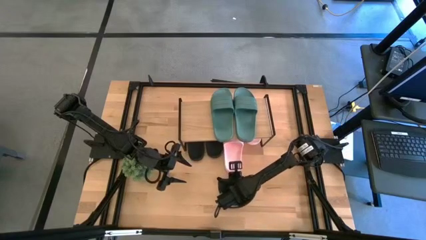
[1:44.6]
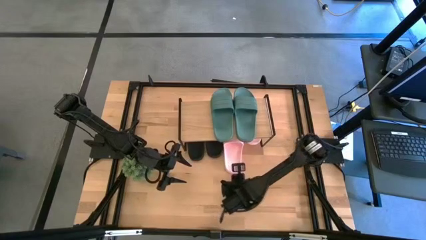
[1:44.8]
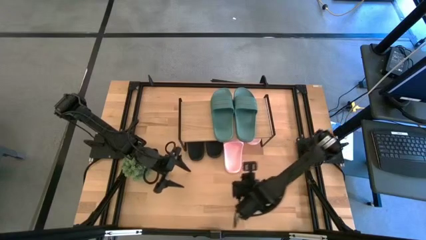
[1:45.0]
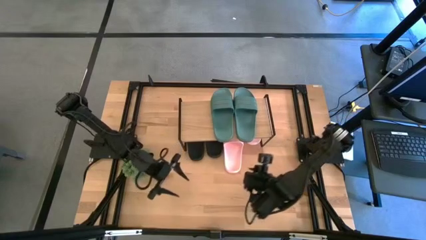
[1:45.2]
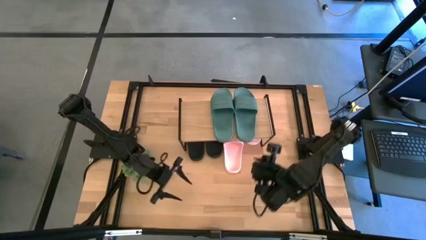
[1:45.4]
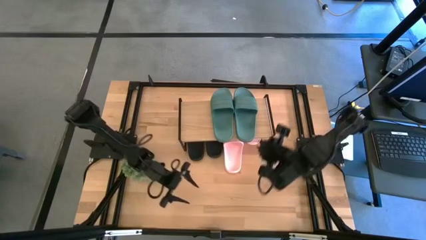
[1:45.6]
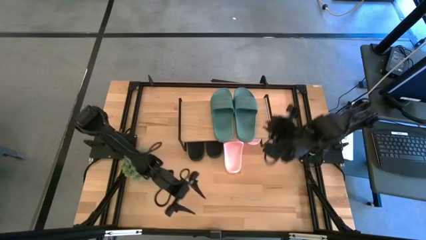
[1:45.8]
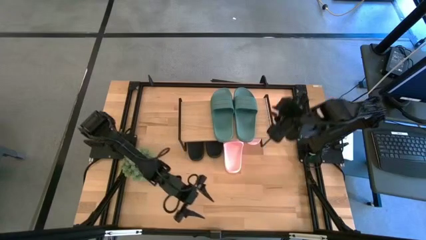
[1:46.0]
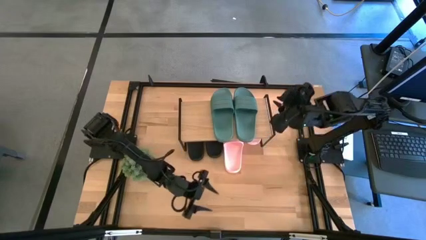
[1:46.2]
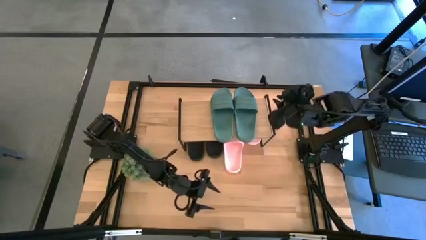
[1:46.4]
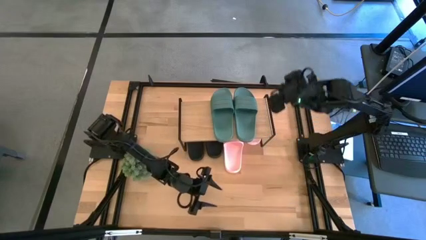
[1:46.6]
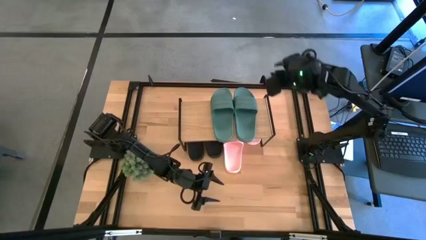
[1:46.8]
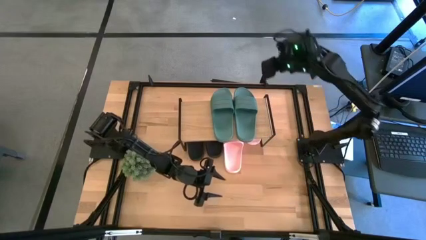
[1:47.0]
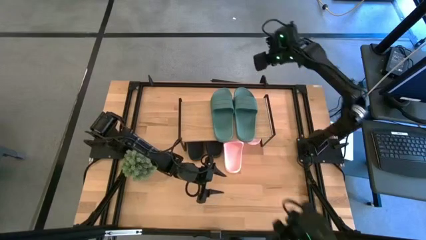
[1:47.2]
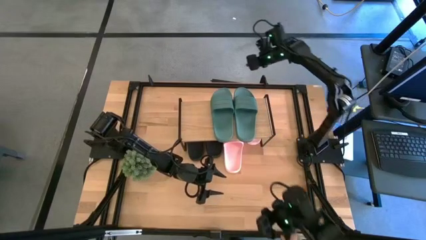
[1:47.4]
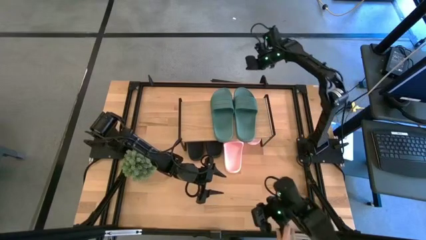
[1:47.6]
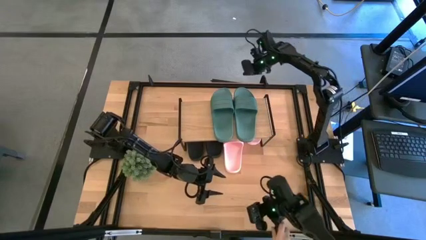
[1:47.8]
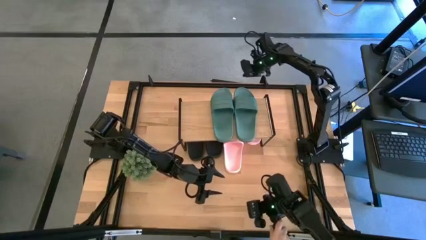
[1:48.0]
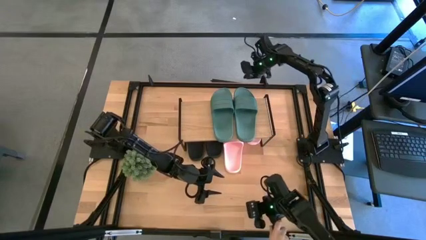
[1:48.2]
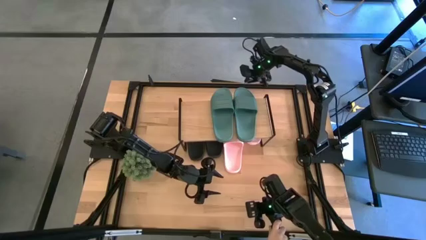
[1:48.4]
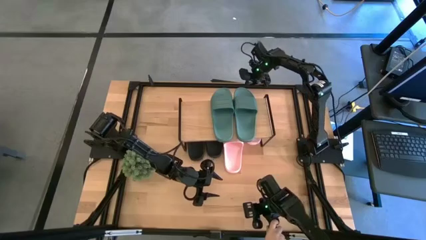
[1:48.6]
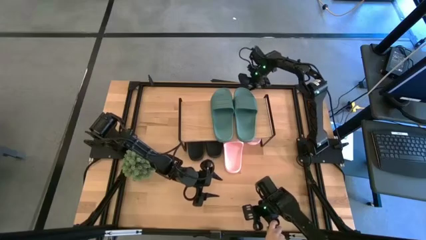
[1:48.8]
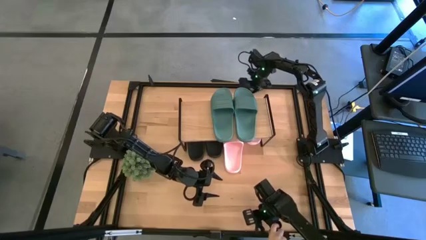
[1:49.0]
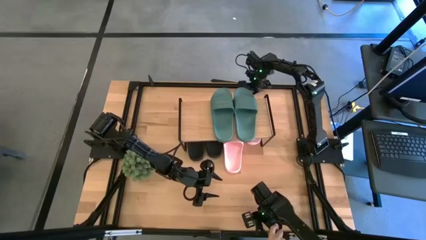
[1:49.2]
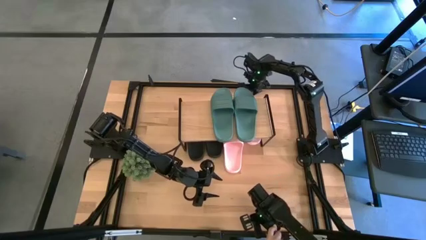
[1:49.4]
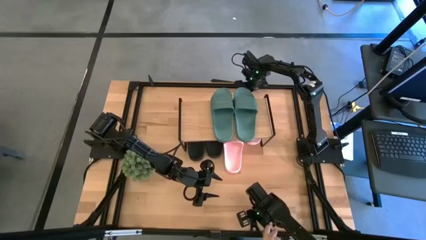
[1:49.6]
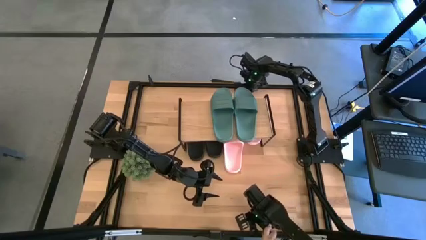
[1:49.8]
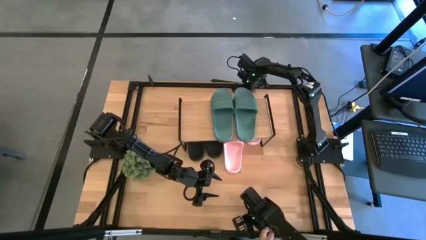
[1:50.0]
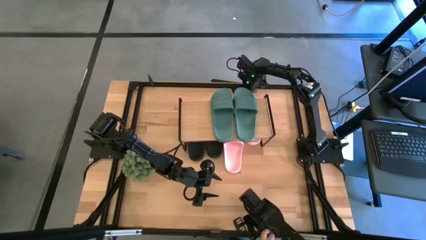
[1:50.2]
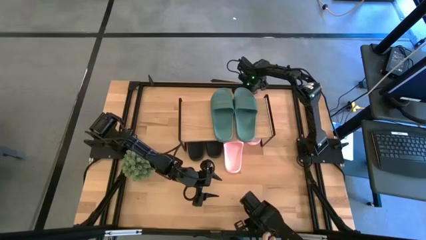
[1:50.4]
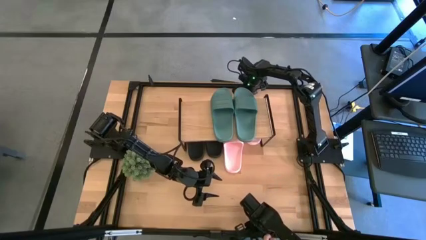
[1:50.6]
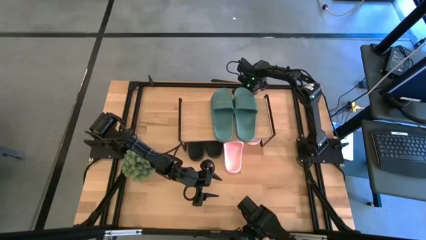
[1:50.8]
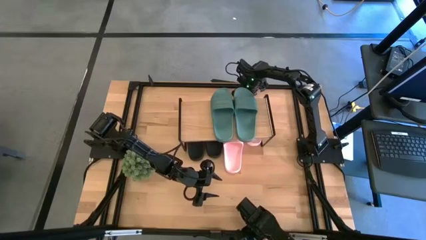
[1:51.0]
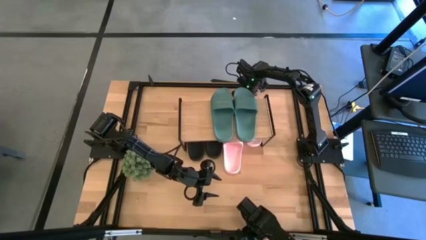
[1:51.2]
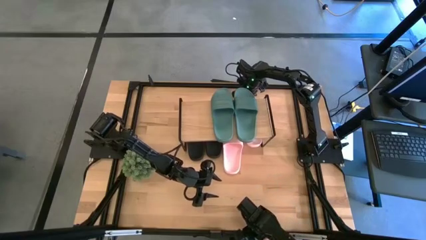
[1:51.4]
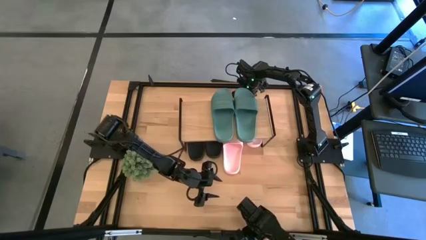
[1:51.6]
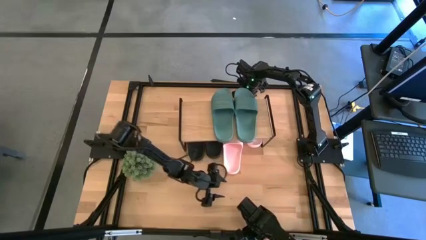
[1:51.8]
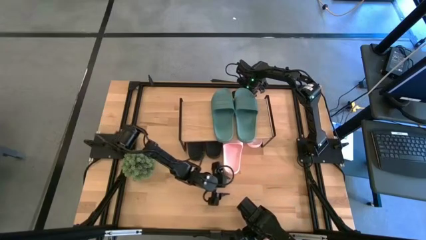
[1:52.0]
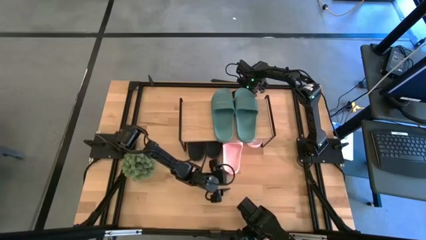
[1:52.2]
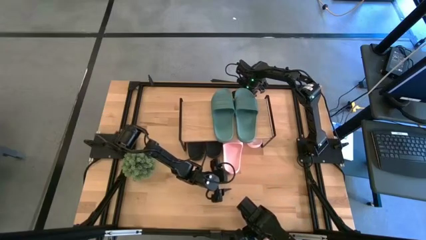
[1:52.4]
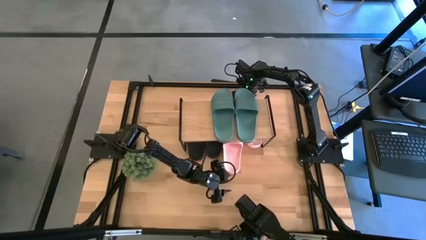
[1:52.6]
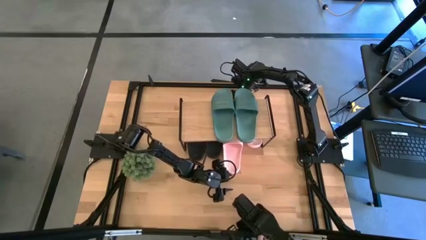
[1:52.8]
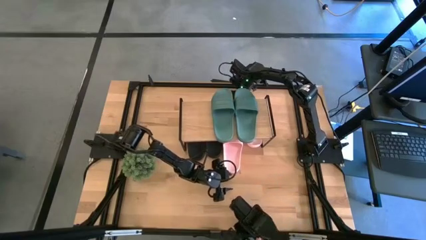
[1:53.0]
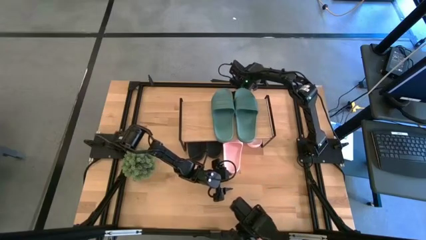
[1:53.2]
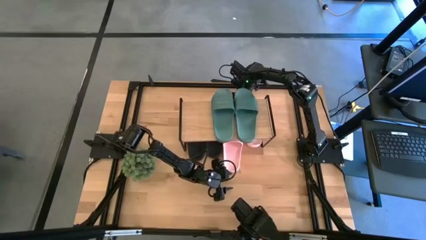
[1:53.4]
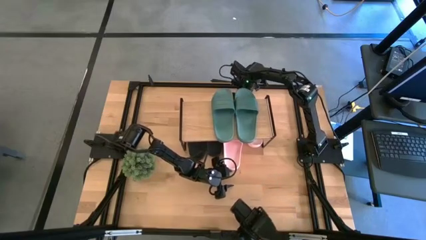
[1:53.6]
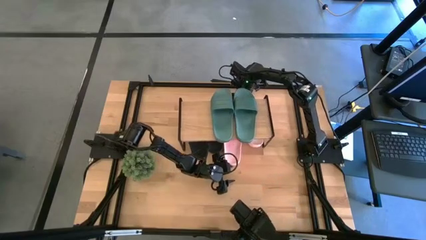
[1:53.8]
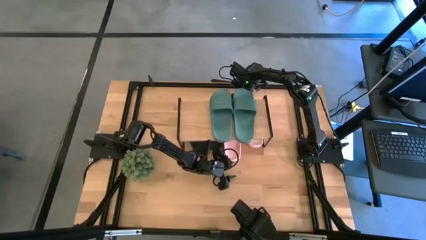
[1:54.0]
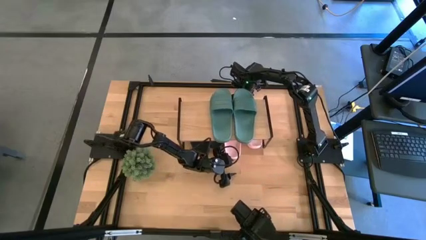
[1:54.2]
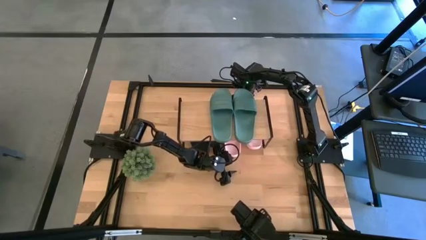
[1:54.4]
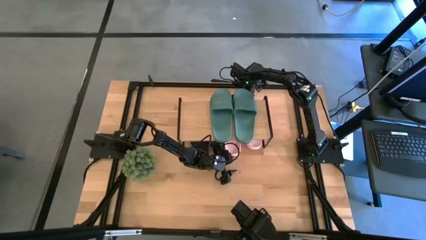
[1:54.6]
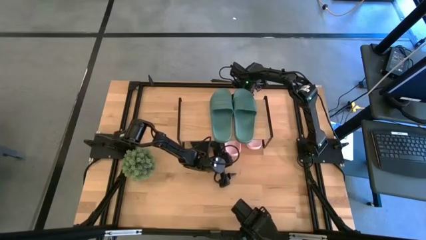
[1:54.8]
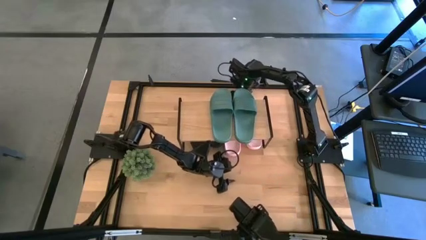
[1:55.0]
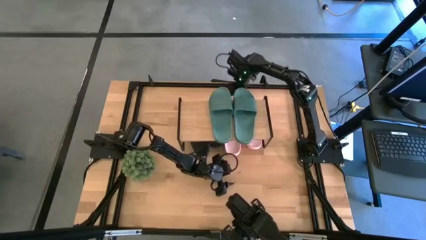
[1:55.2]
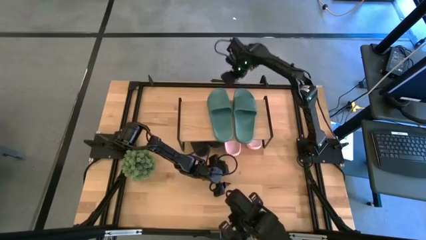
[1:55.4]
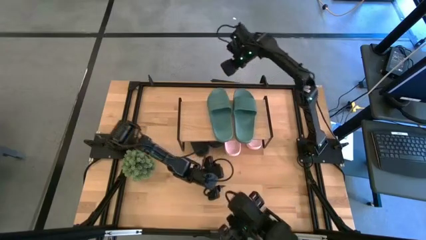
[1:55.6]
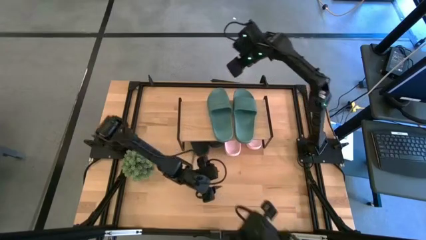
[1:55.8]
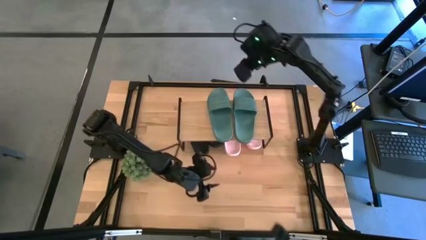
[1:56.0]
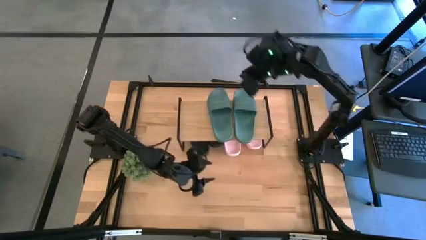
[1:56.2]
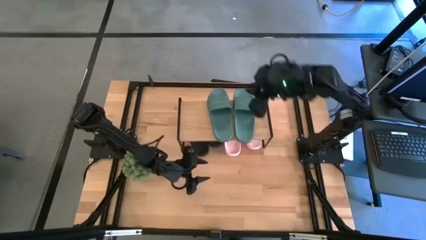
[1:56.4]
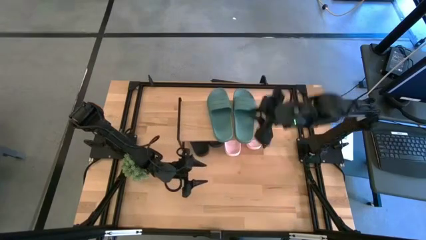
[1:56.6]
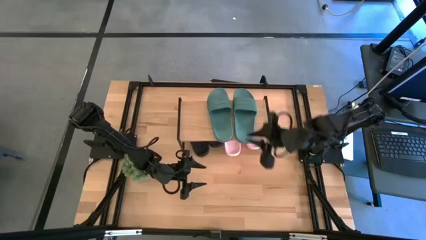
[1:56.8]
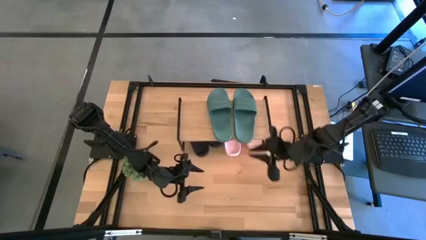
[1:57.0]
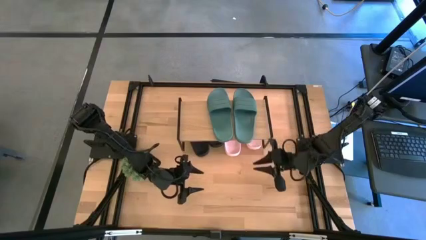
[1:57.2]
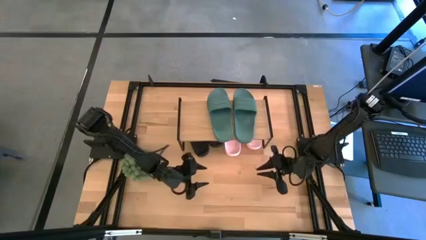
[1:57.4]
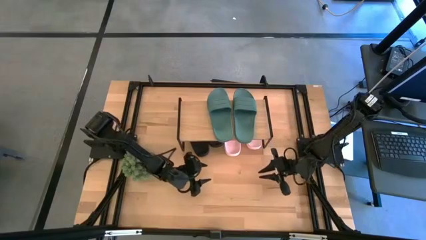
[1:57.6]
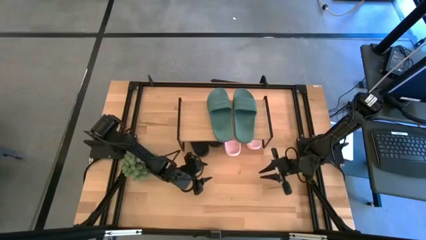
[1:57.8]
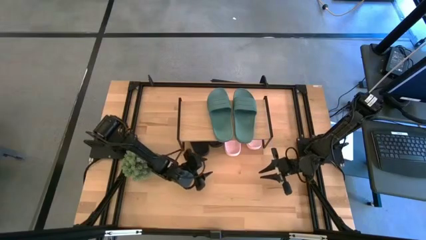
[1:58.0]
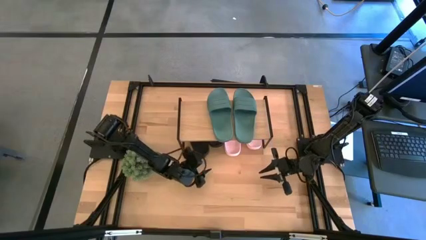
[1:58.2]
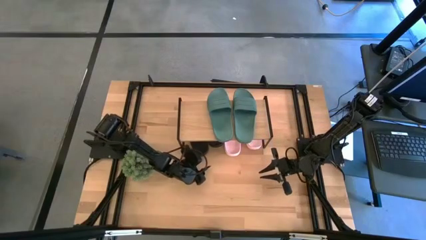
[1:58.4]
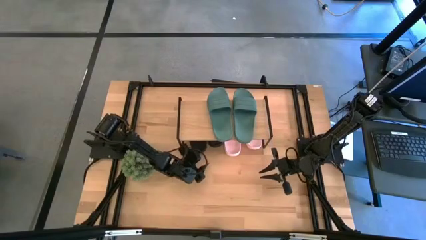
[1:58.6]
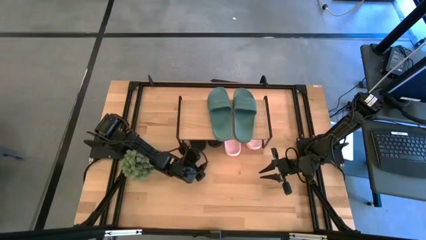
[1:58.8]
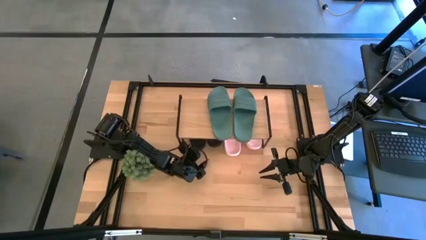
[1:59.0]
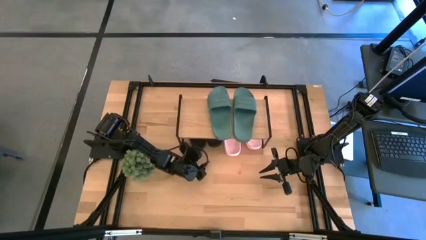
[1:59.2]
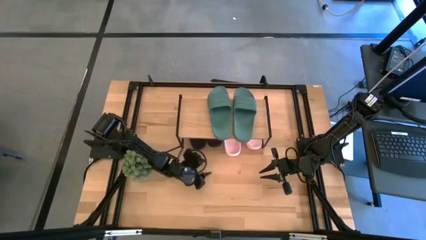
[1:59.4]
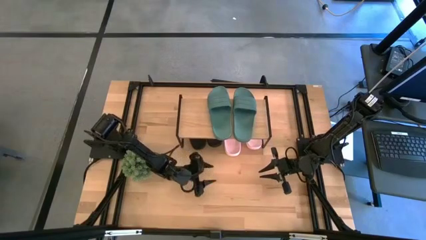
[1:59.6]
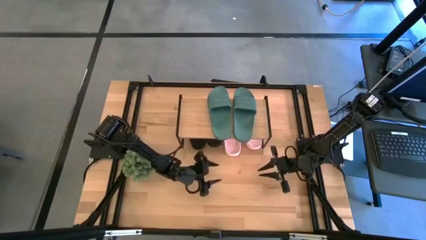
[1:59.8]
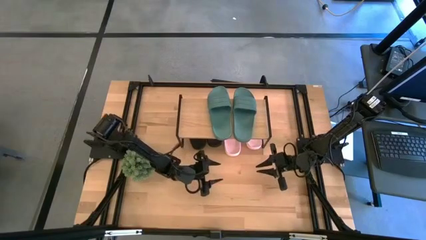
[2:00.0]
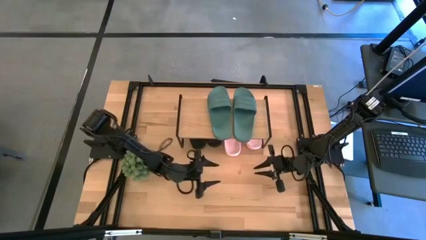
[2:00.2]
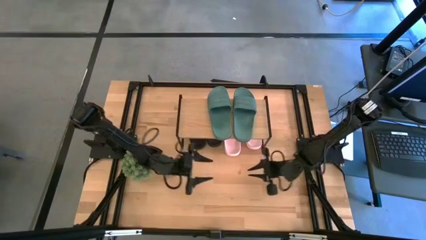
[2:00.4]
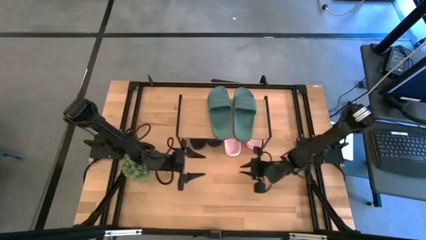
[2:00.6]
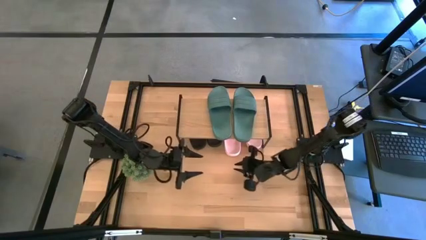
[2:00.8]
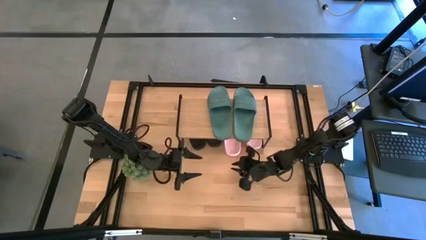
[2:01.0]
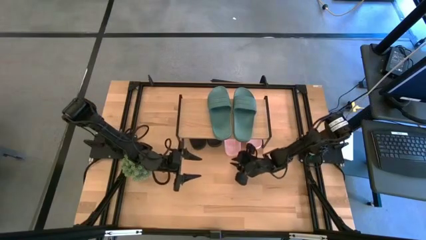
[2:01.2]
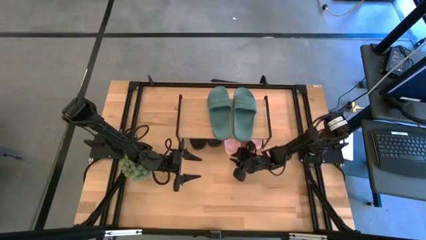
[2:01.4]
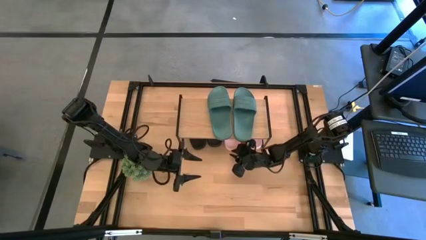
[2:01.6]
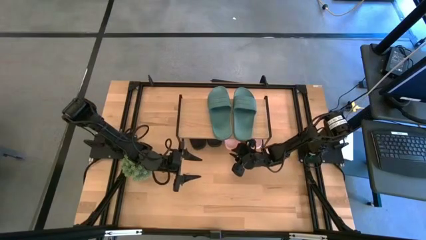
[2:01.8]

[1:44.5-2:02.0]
Task: Pick and place slides into the shelf
Adjust the slippers
